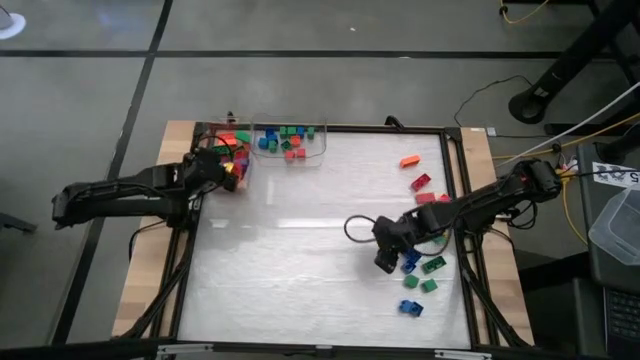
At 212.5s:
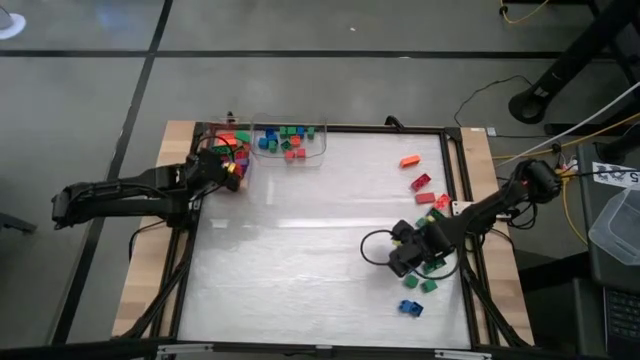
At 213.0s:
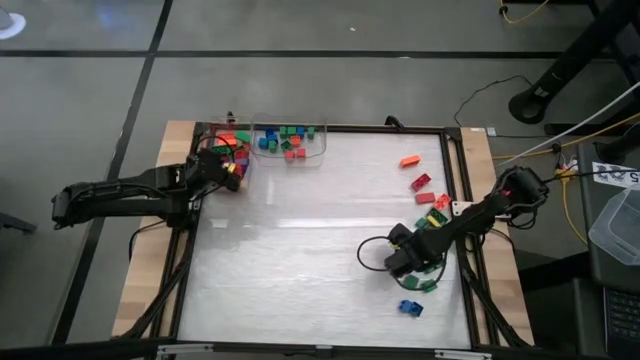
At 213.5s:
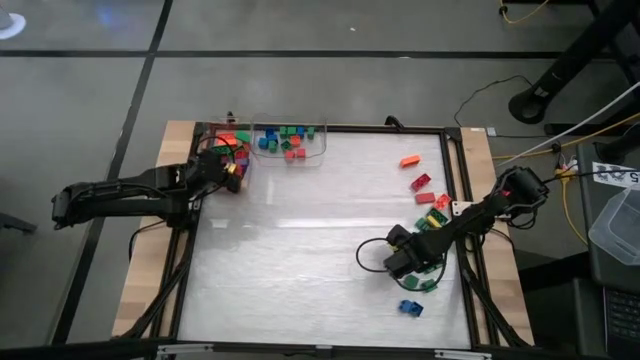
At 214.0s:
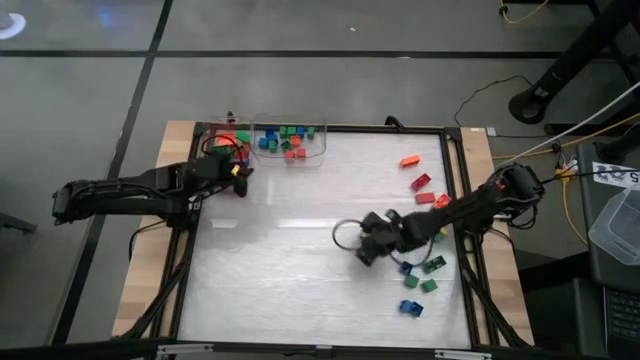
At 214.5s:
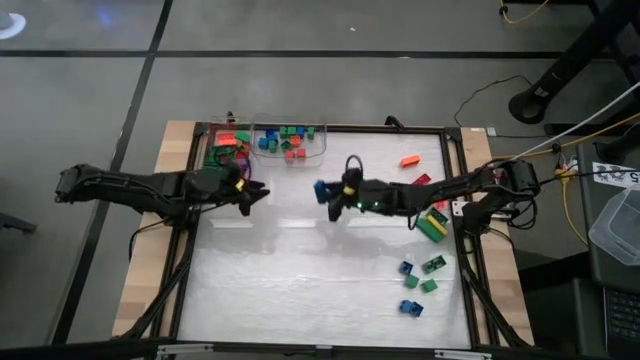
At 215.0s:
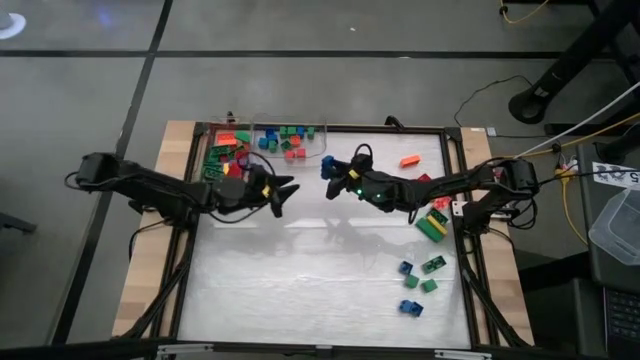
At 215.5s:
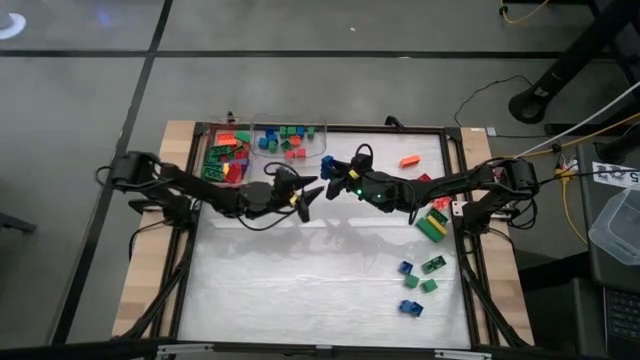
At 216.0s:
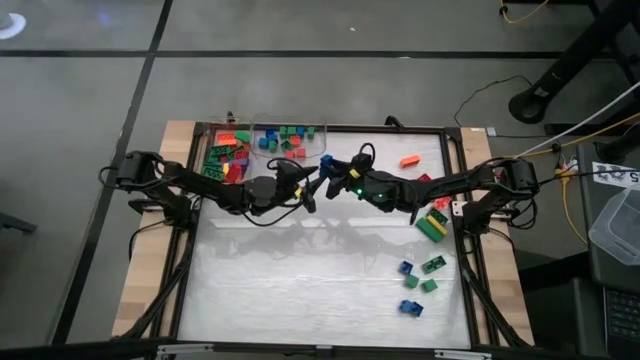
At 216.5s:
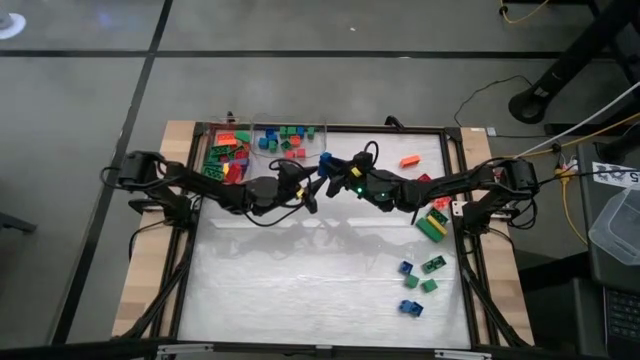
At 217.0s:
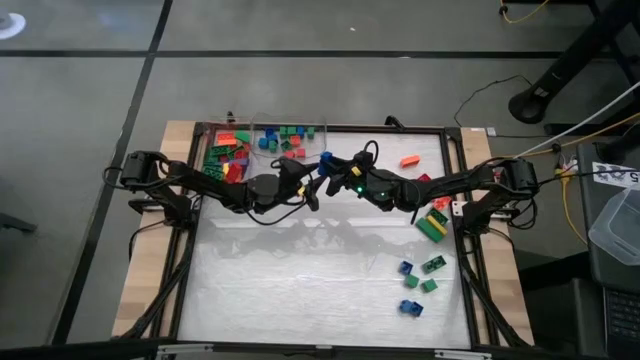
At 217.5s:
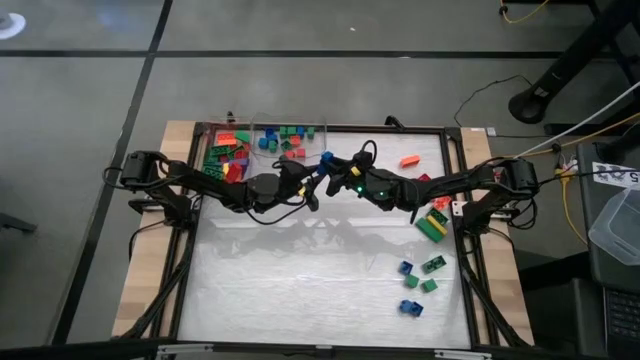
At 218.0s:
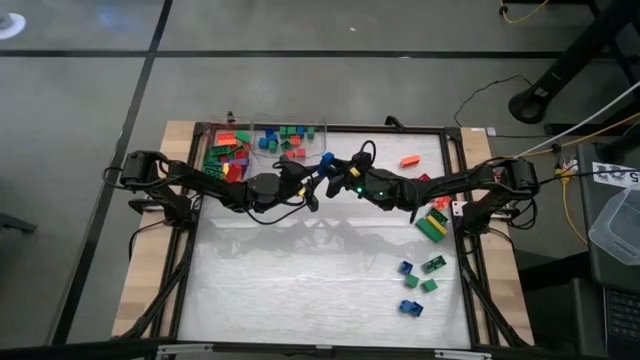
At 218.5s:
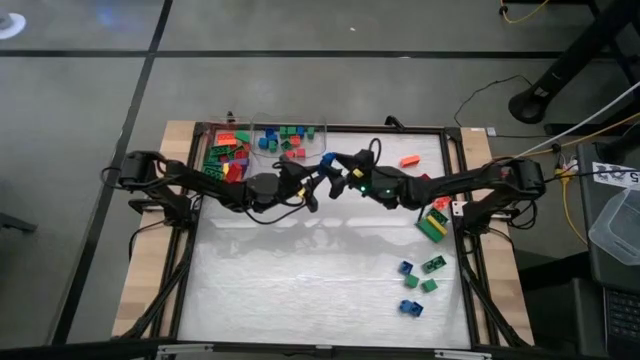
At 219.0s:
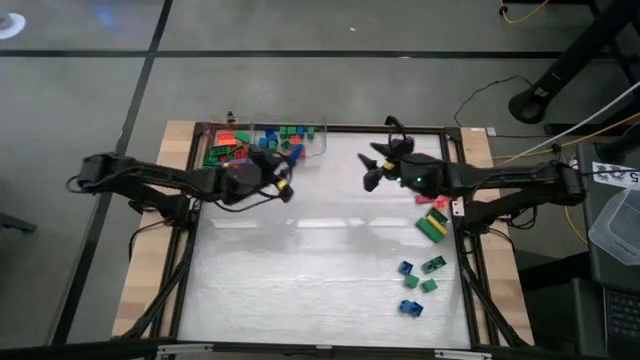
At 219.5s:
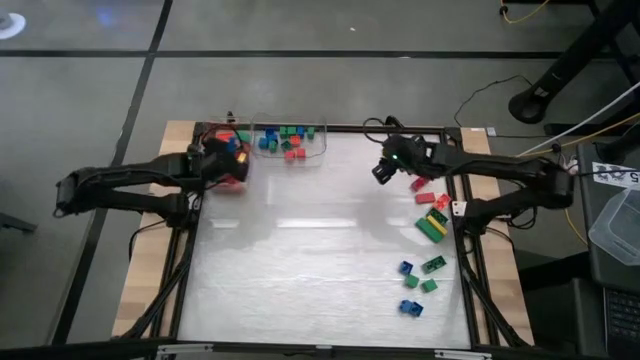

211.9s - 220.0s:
Task: Sort blocks by size
Put the large blue game piece into the left transparent bin

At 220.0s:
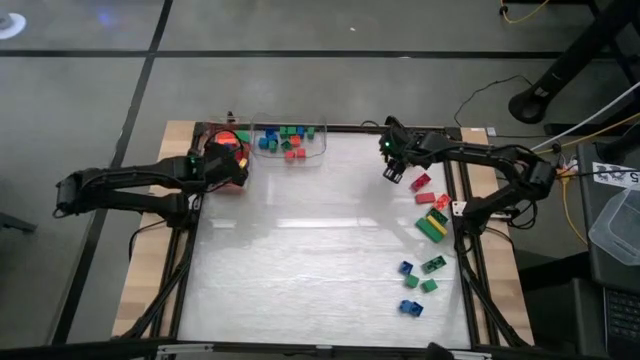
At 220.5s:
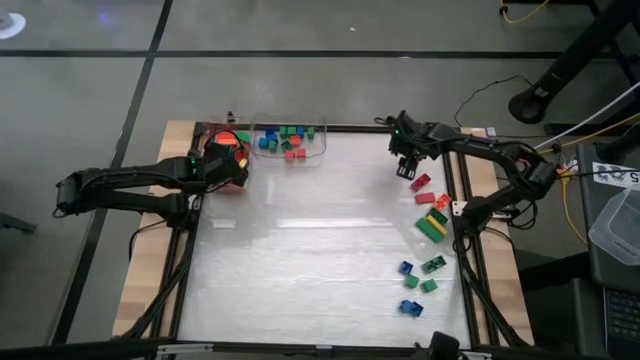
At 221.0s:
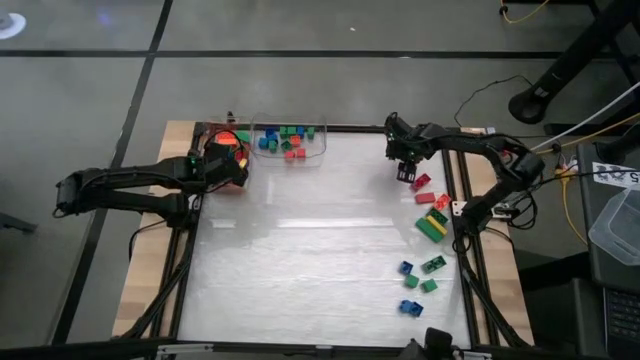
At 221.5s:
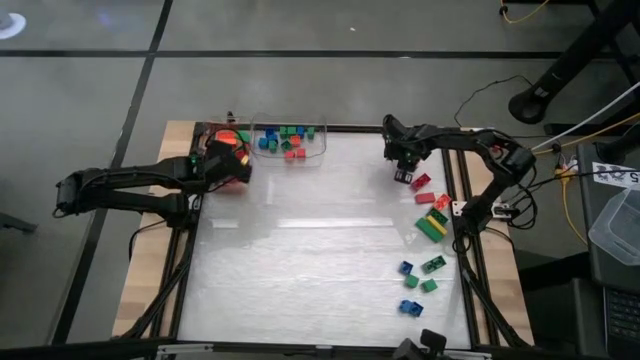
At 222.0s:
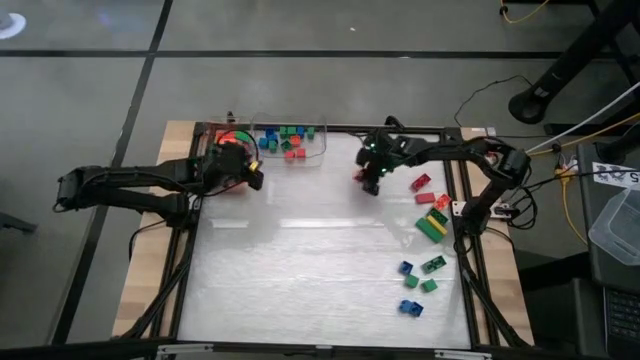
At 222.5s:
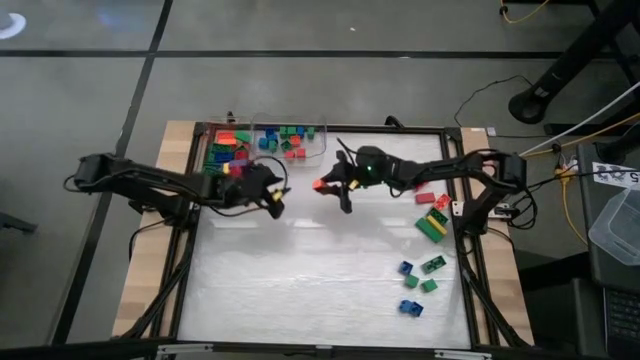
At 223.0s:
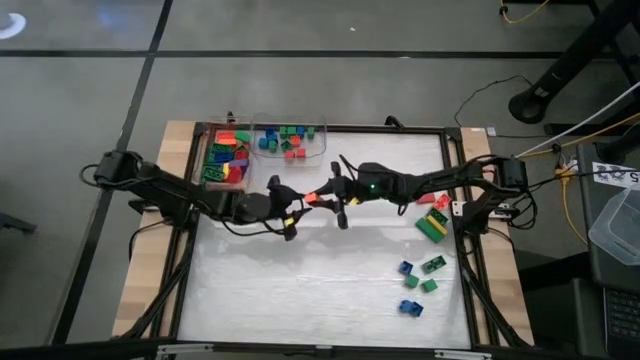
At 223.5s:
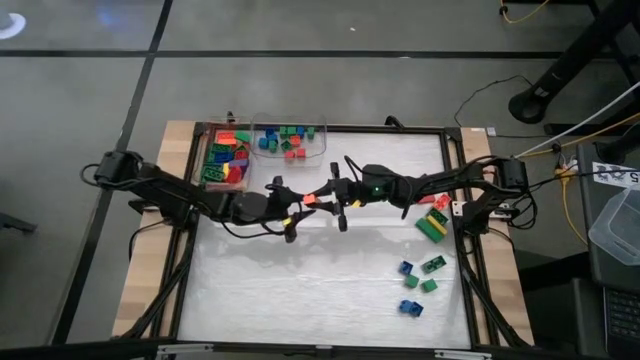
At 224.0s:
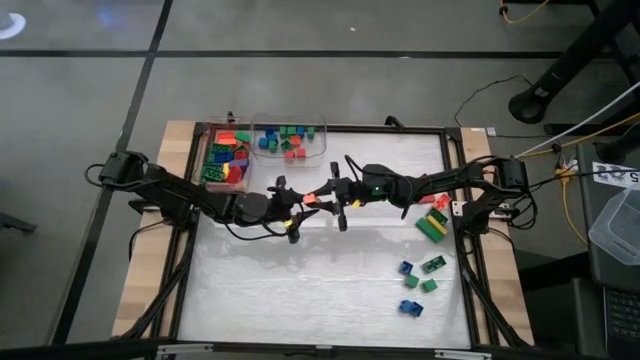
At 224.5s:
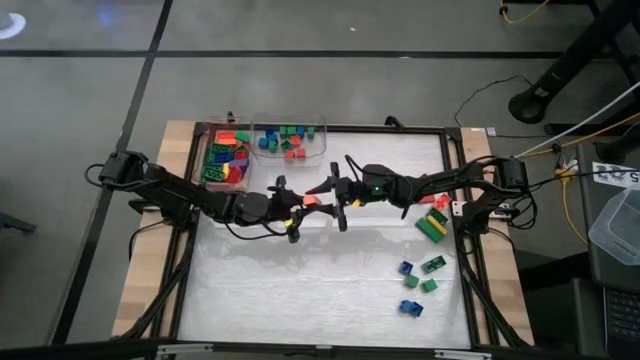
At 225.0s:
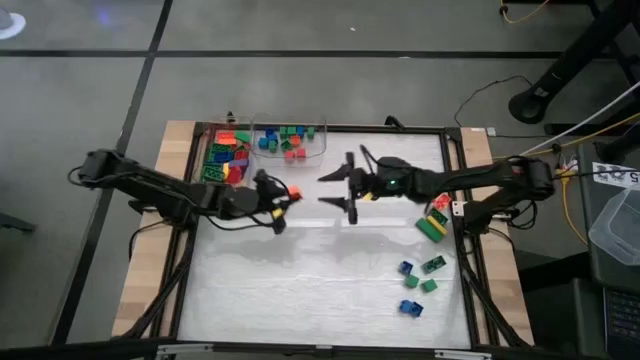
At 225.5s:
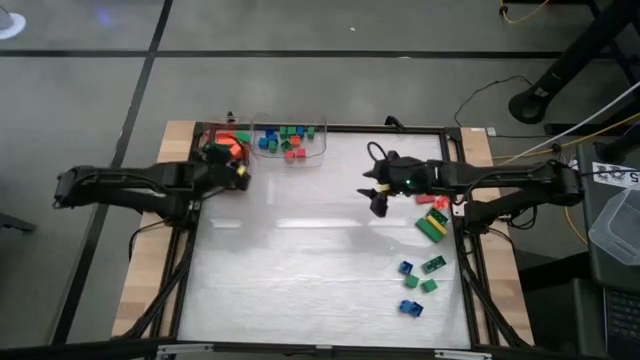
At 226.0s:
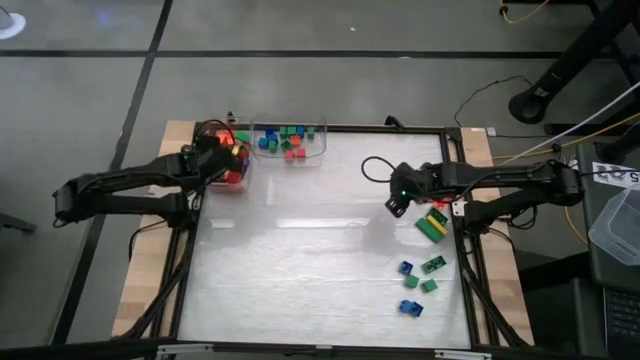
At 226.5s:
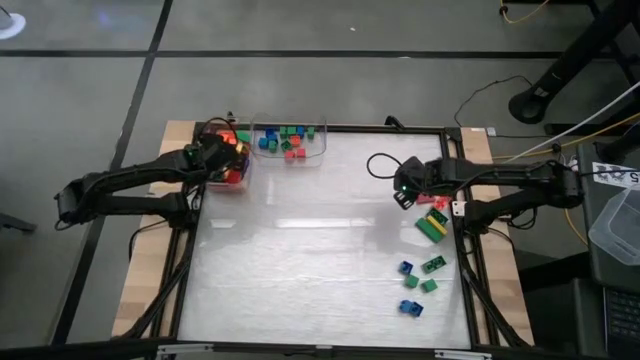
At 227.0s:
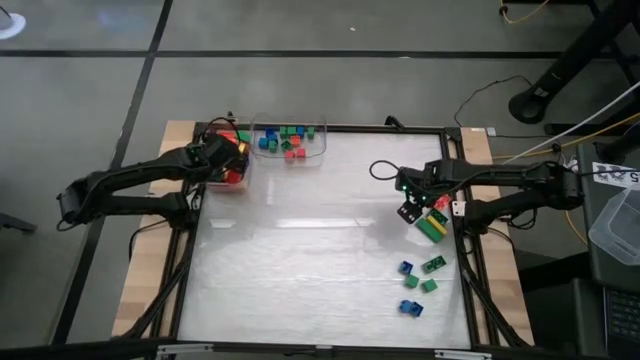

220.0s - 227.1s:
Put the large orange game piece into the left transparent bin

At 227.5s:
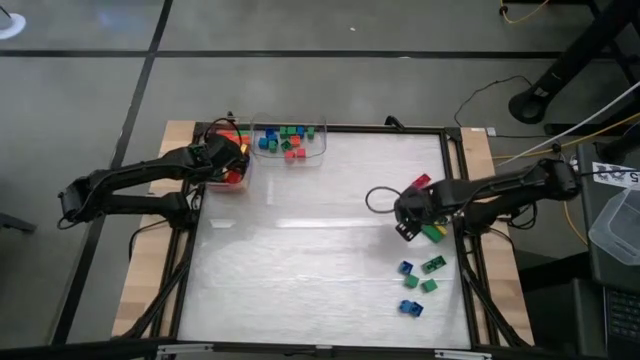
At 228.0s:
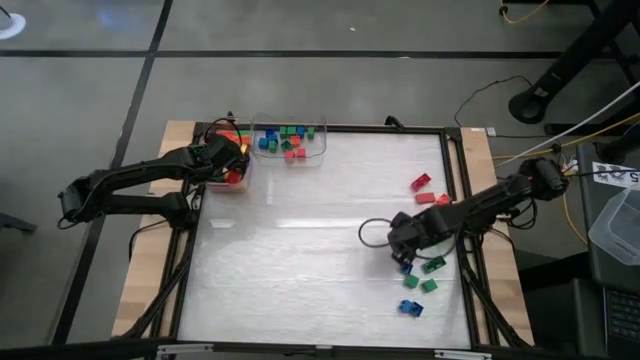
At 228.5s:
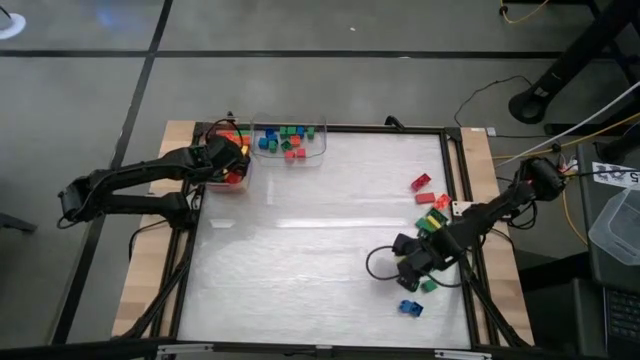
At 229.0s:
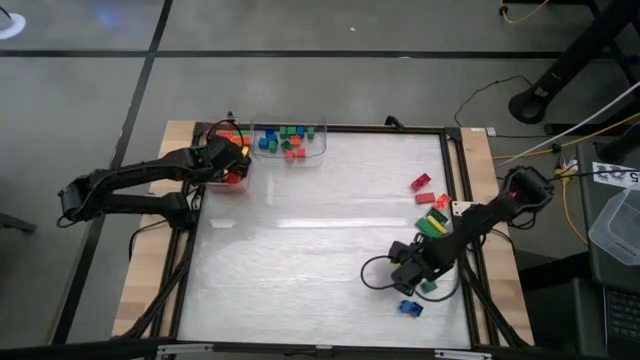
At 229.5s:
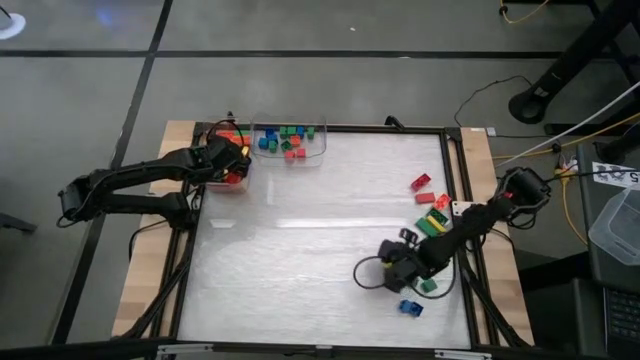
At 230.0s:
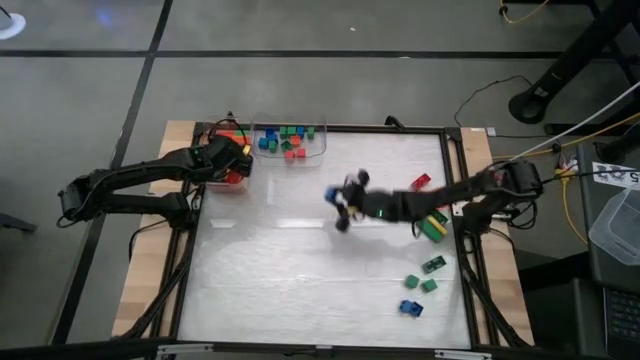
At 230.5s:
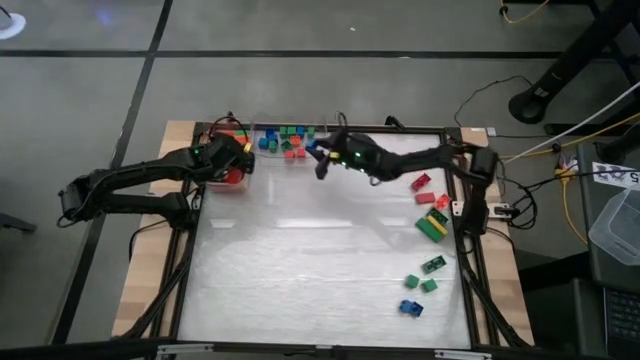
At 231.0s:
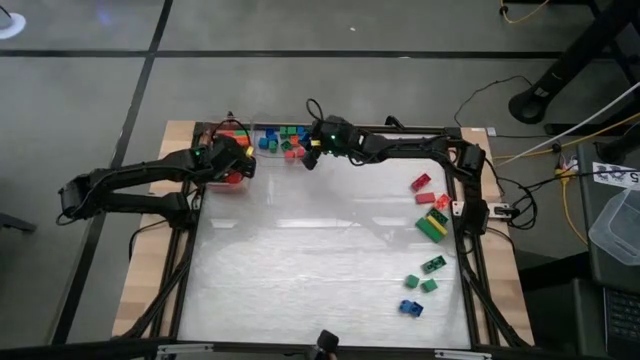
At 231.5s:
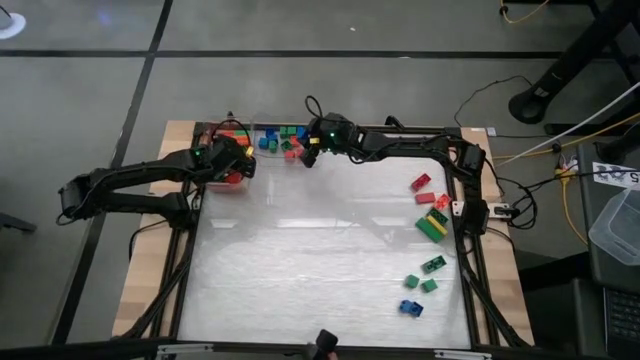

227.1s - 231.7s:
Put the small blue block into the right transparent bin

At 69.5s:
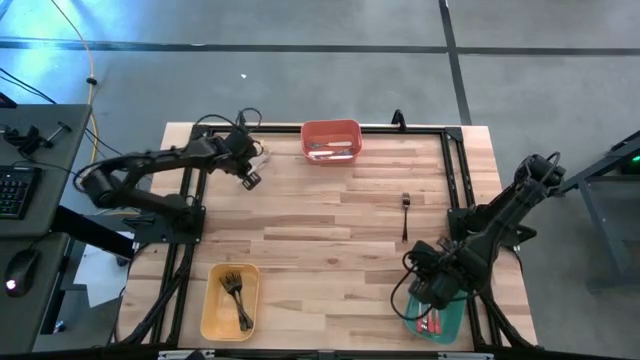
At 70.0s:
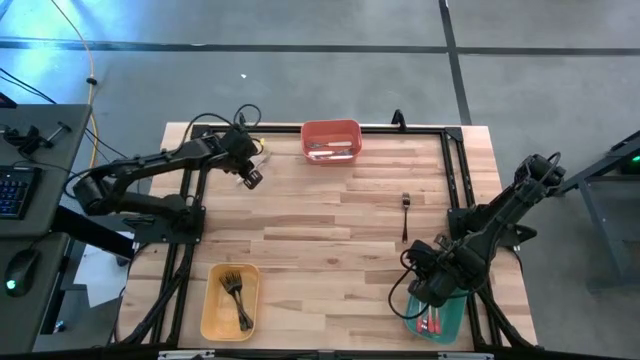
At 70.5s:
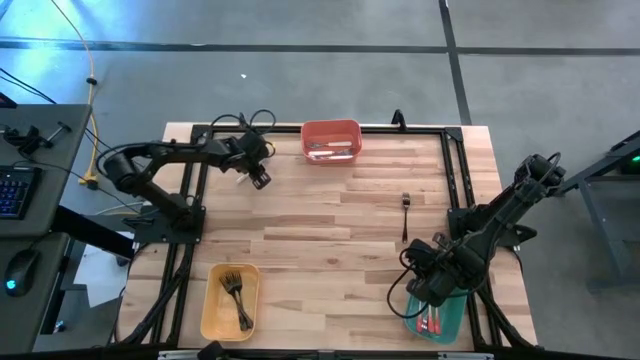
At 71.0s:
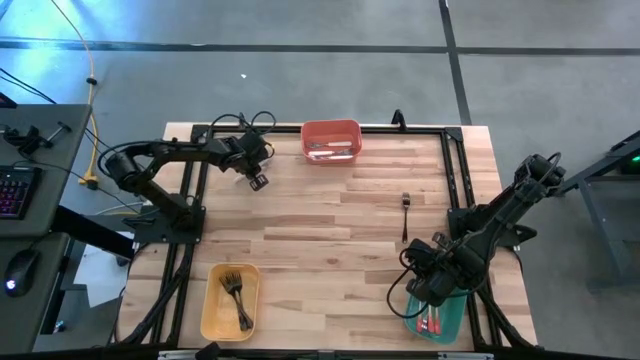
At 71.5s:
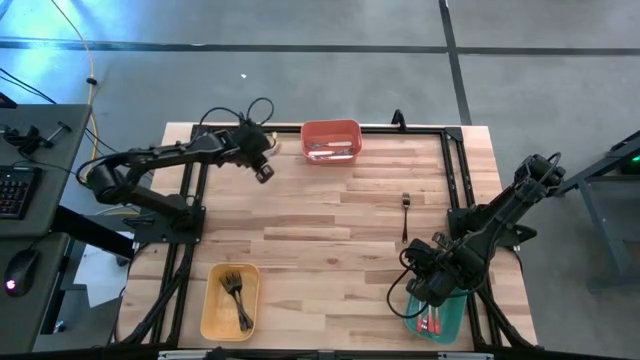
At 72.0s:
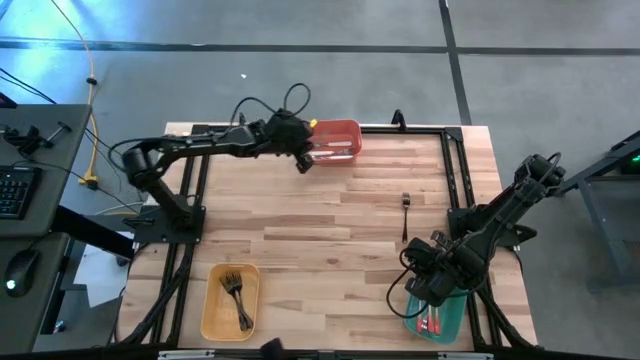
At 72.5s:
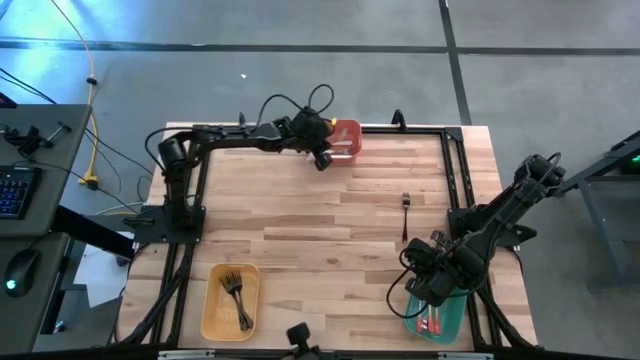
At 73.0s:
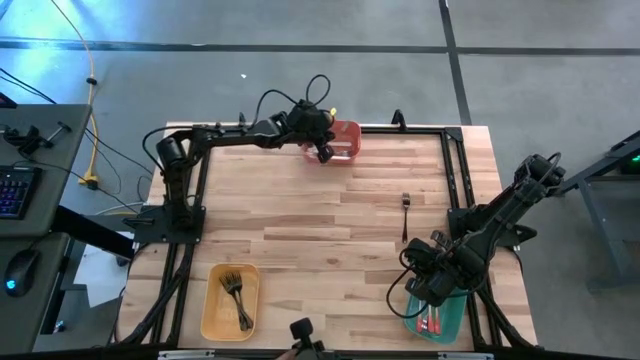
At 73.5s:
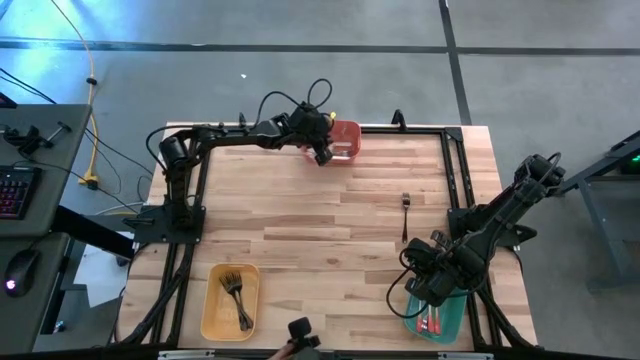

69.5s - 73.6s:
Task: Sort silverware by color (type)
Put the white fork into the orange bin
